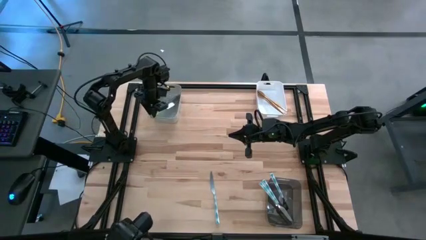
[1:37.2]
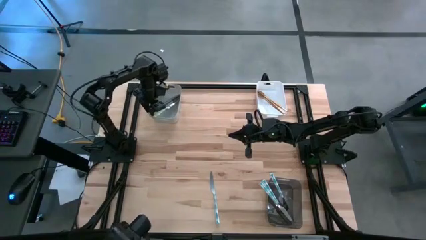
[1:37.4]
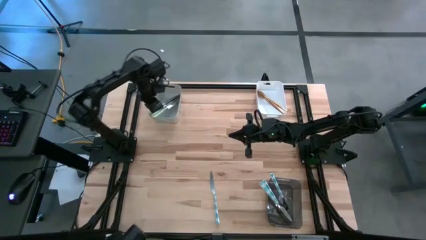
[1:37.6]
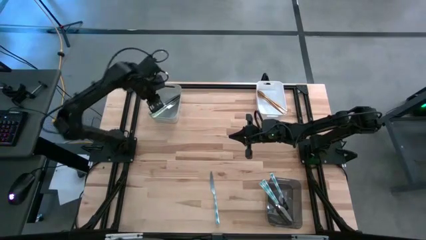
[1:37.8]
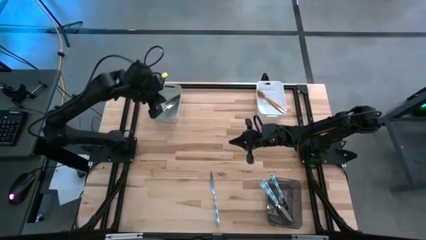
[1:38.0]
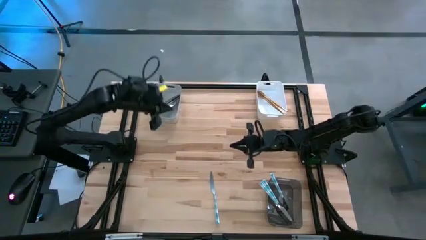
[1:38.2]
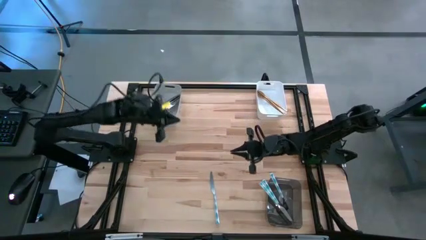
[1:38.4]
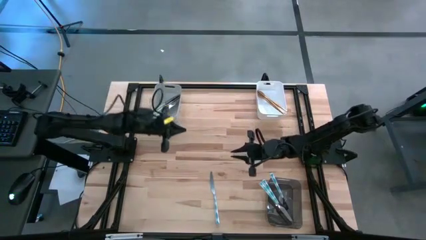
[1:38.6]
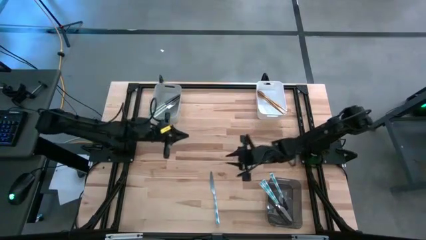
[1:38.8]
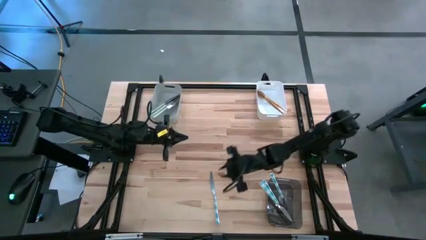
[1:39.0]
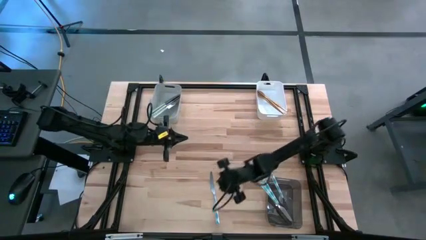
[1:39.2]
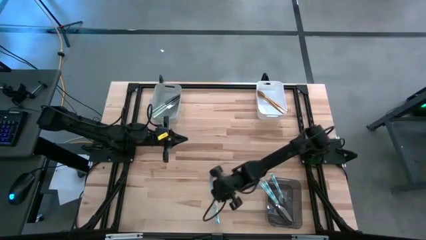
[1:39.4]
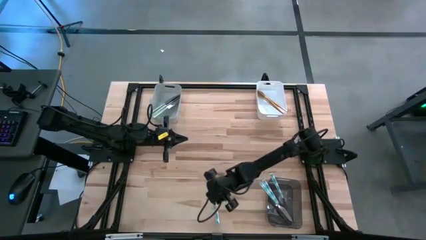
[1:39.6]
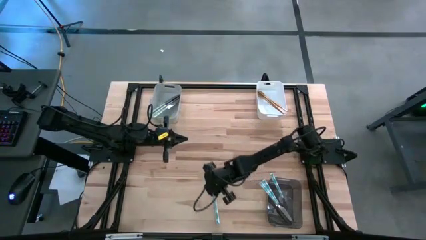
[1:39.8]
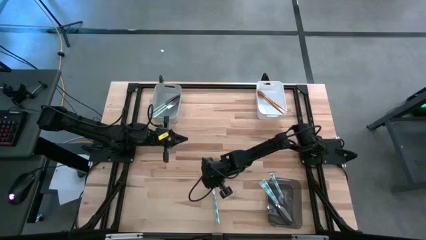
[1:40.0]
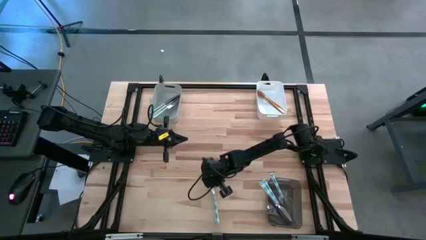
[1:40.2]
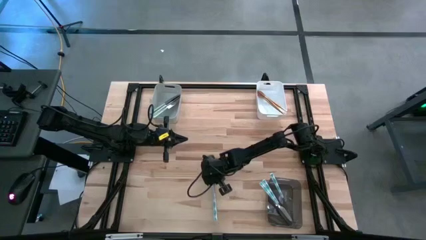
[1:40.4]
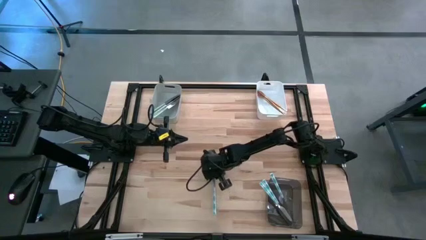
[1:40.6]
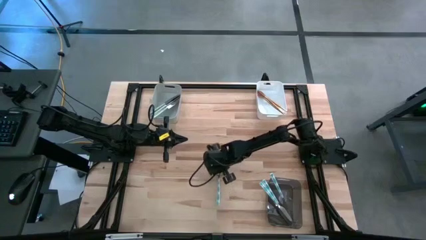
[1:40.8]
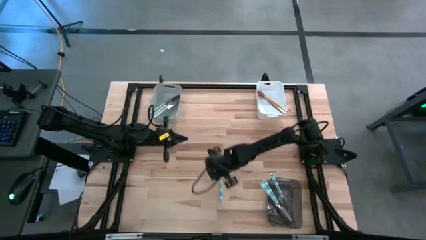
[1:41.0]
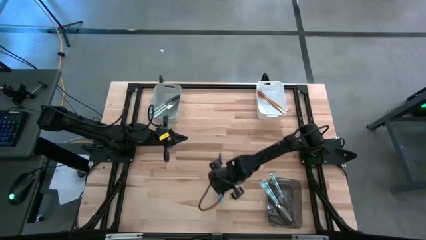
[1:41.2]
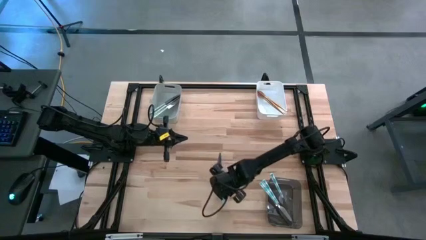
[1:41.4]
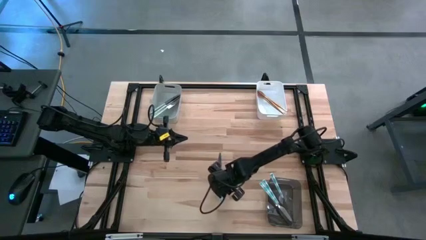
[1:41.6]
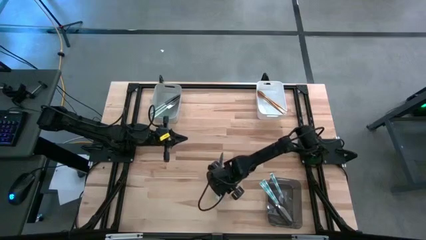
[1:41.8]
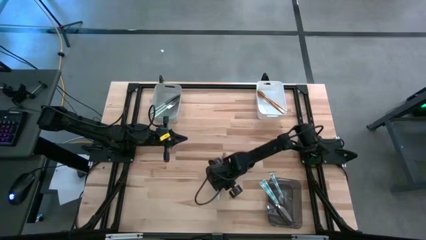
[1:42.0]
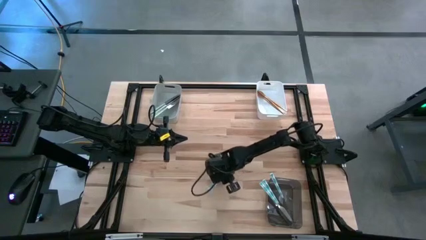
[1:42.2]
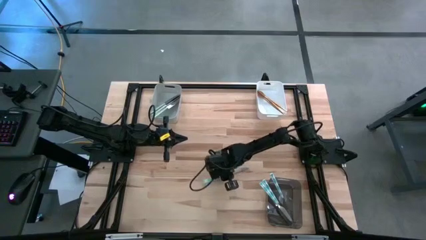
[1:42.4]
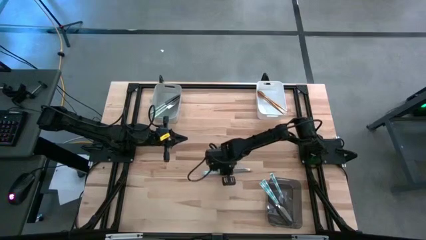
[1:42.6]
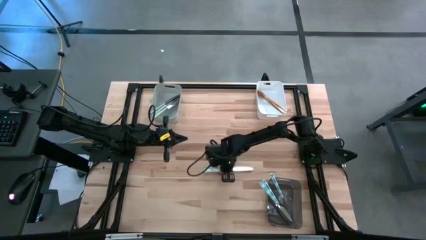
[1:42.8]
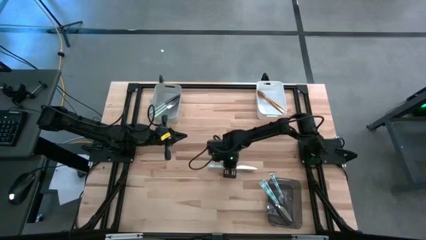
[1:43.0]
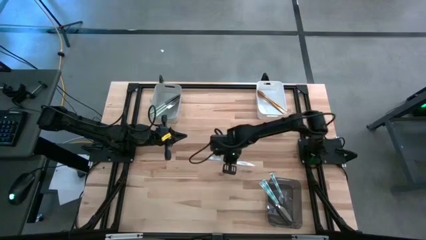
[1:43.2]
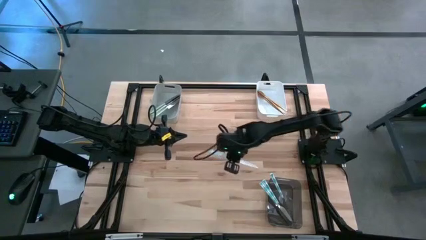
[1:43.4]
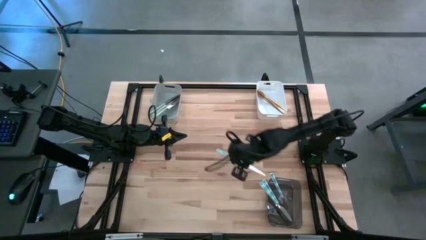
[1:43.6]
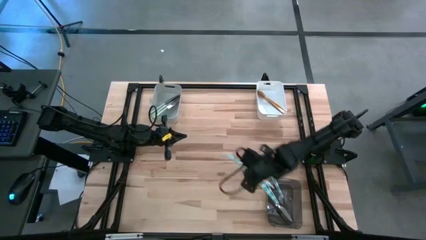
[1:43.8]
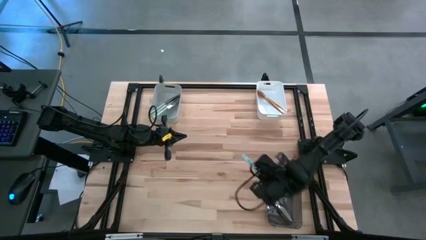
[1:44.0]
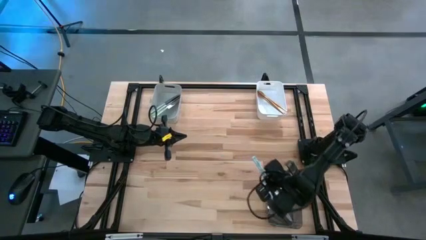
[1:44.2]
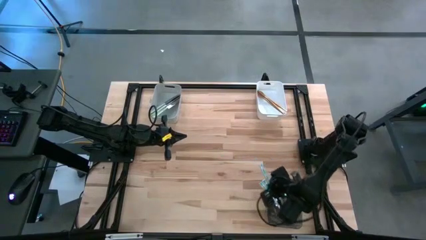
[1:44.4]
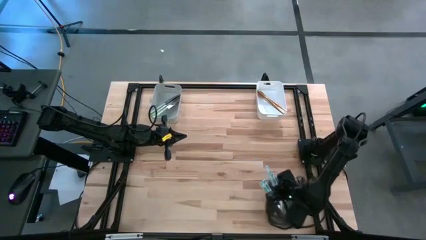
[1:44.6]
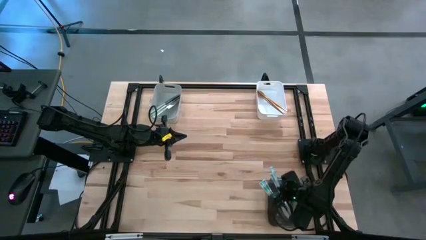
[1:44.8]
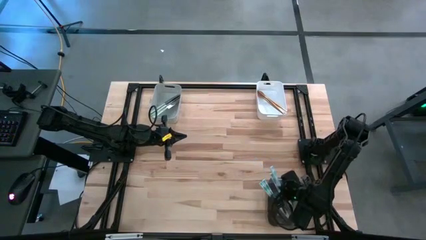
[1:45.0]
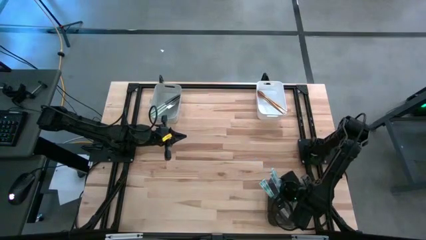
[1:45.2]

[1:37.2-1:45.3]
Task: Sort silverware by color (type)
Put the blue knife into the black bin

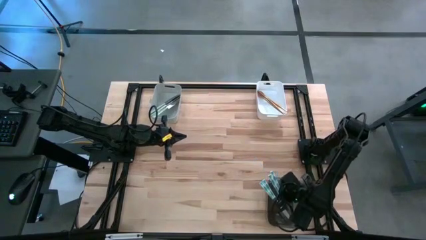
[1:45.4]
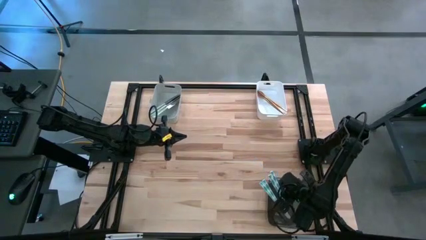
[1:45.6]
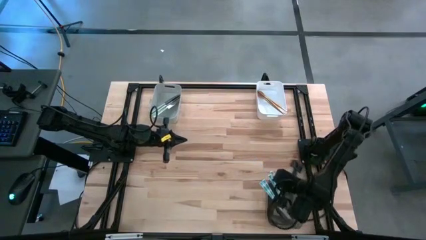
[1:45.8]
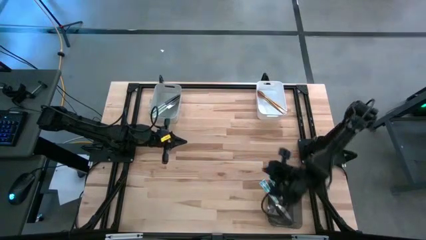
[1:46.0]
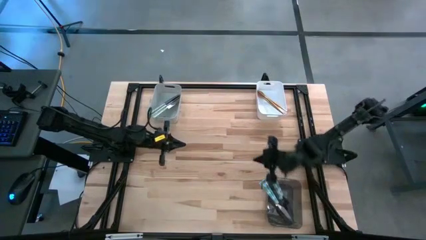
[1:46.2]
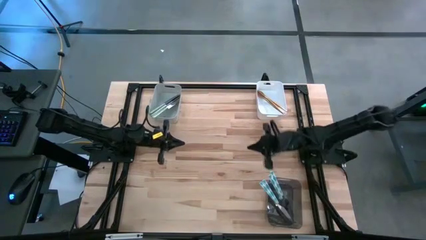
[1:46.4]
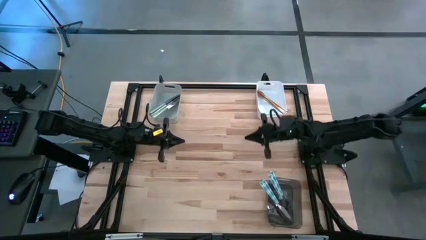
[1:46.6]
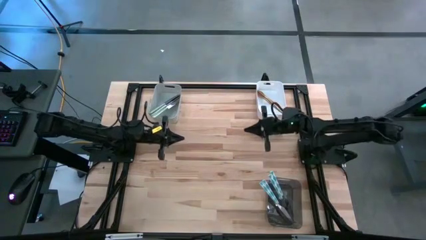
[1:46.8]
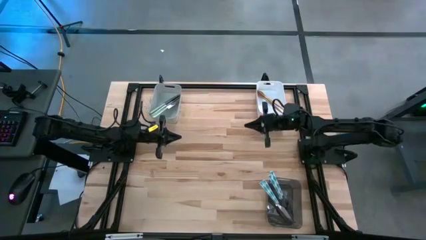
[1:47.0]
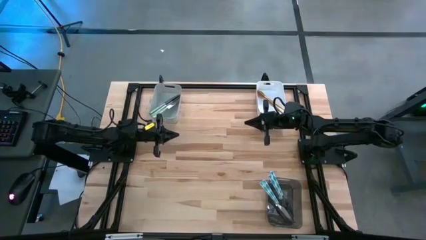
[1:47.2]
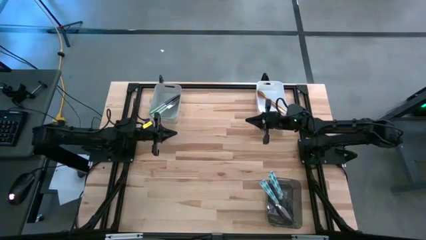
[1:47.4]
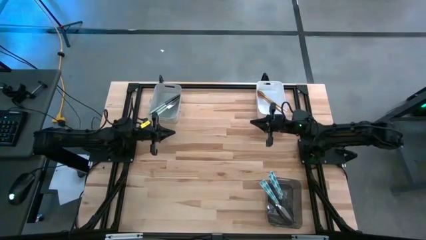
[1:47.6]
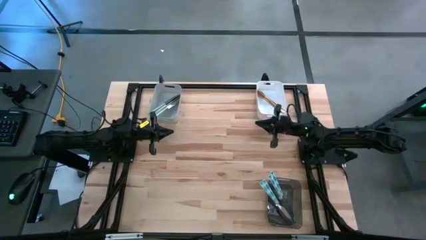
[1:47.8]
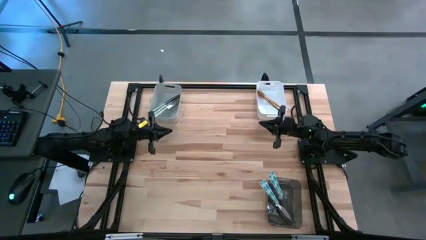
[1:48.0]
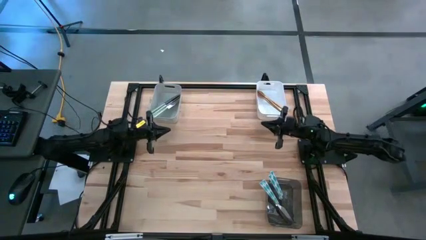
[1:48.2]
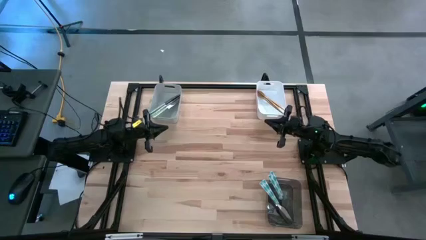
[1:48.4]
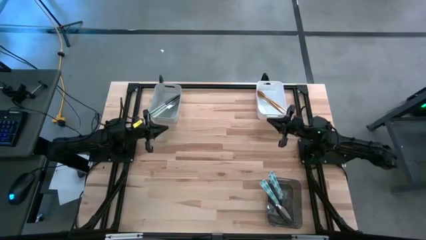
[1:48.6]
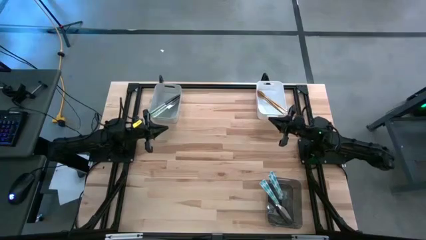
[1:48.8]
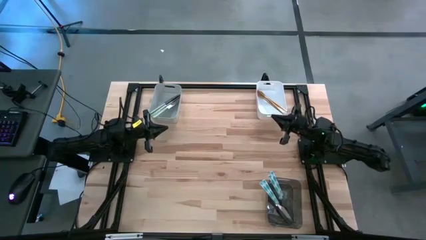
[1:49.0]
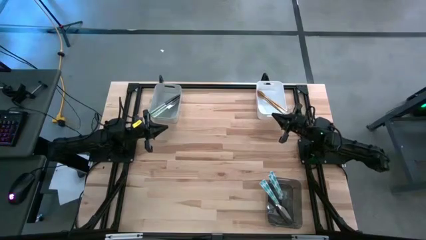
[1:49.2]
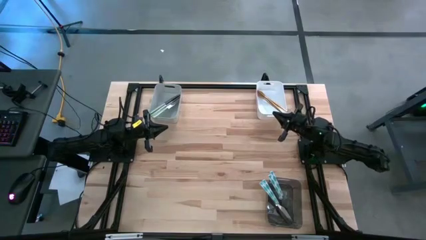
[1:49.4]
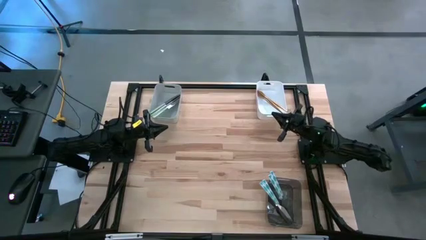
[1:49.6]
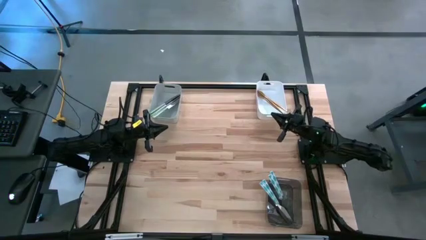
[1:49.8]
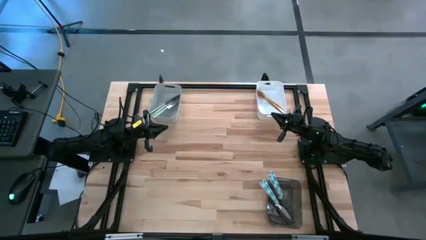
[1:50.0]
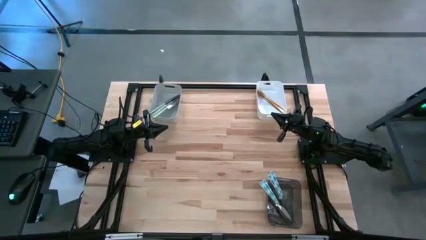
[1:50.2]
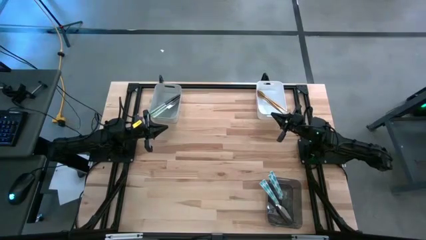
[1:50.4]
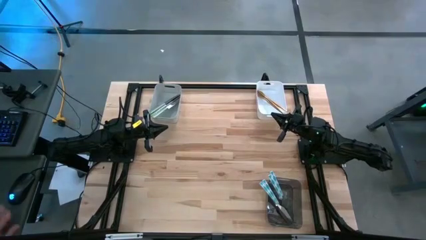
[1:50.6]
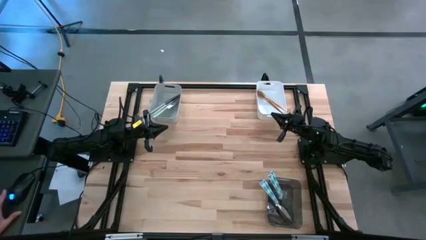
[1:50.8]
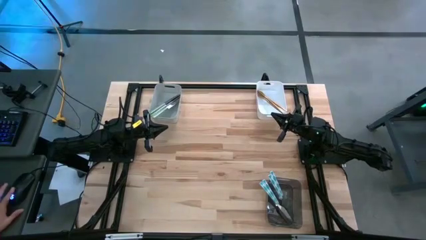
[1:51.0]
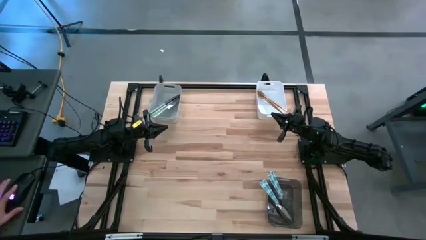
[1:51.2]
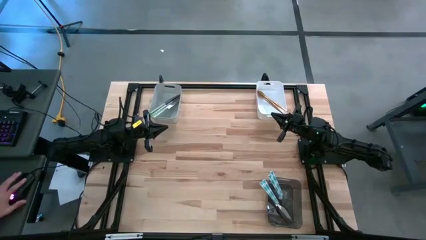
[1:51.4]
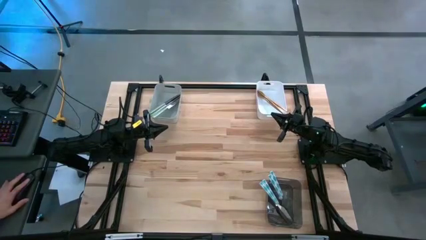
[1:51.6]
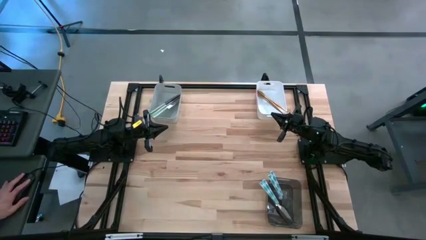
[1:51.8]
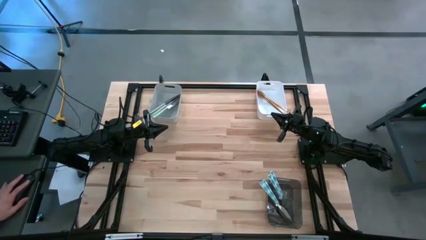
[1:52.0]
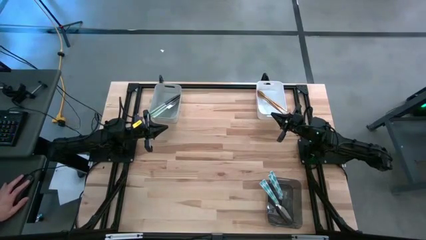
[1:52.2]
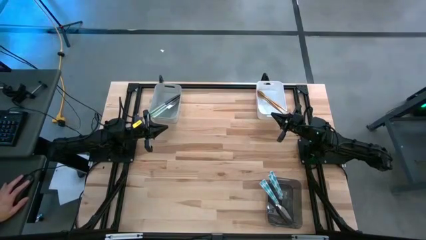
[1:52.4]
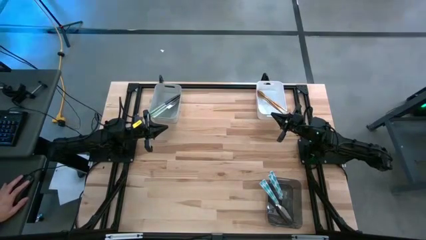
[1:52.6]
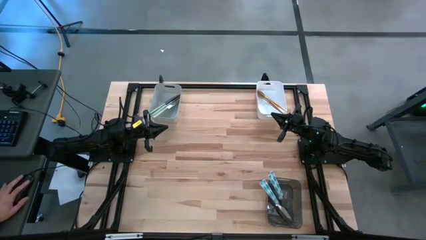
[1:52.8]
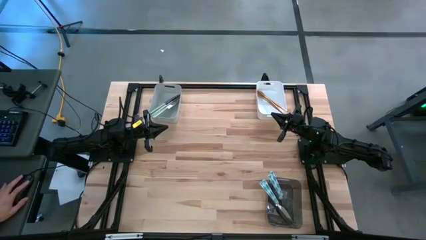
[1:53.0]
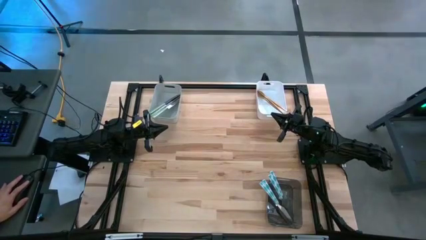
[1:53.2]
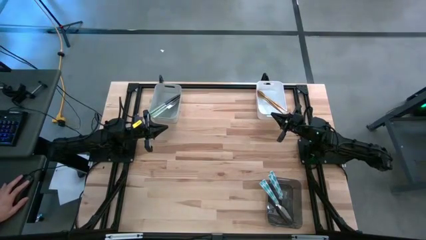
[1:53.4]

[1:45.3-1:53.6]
Return to Home Position
